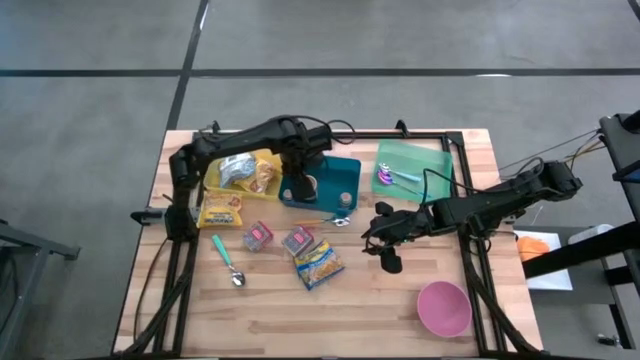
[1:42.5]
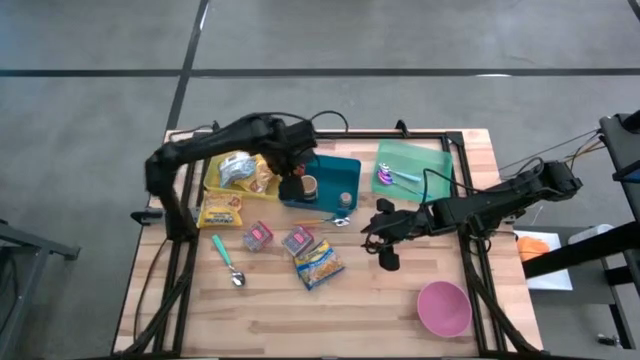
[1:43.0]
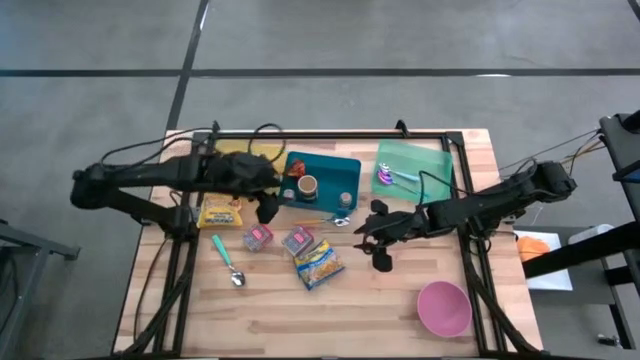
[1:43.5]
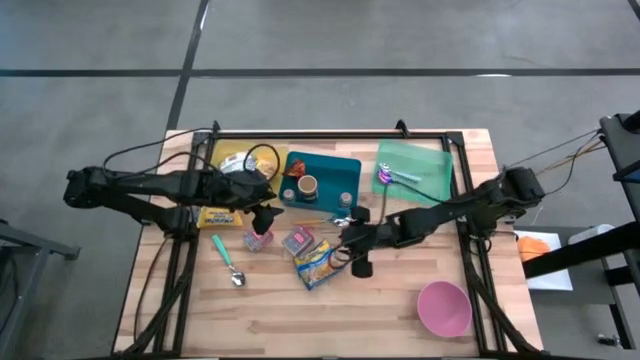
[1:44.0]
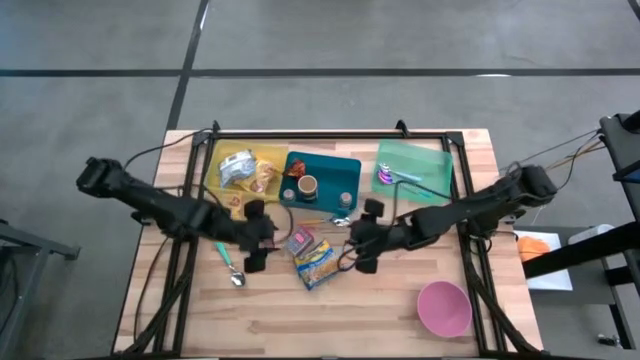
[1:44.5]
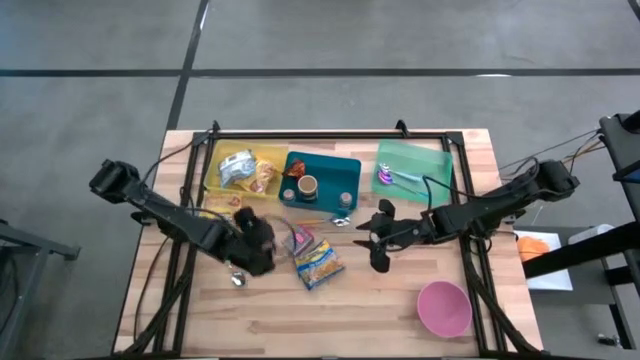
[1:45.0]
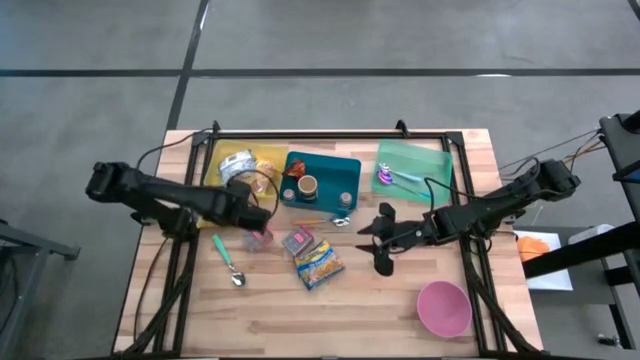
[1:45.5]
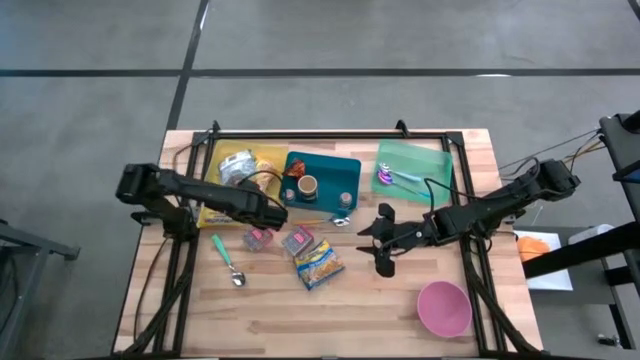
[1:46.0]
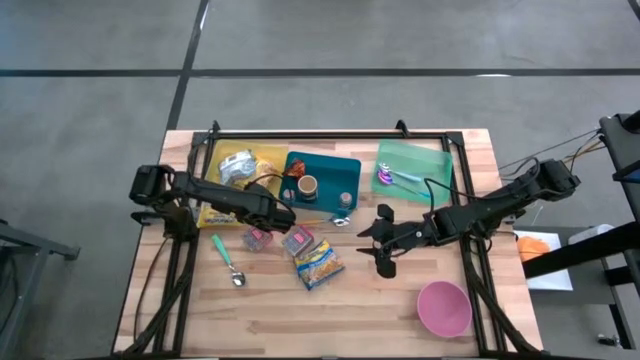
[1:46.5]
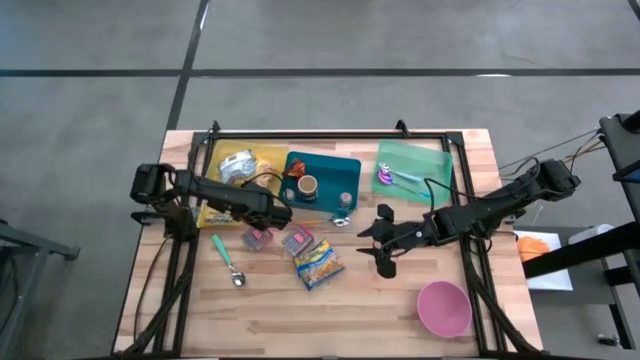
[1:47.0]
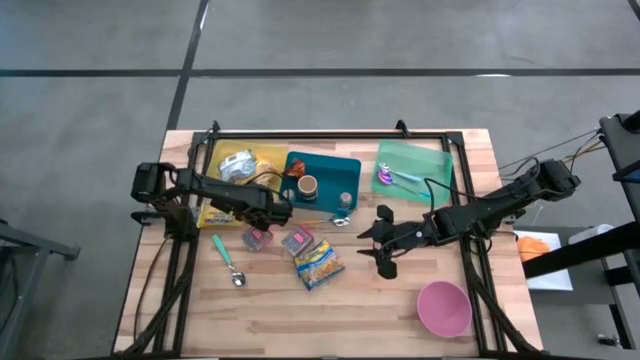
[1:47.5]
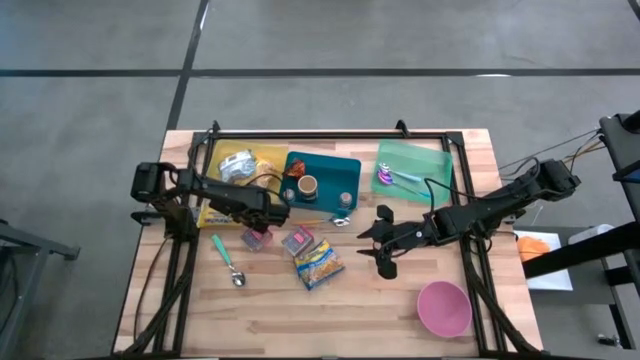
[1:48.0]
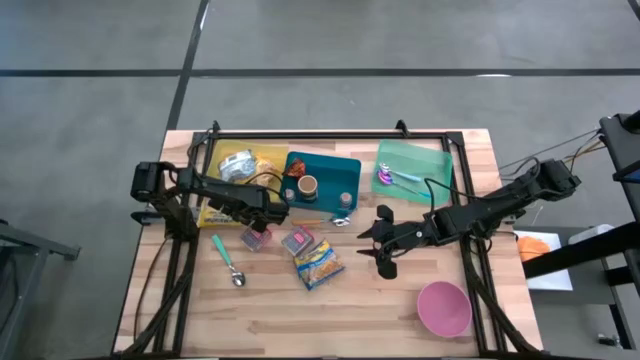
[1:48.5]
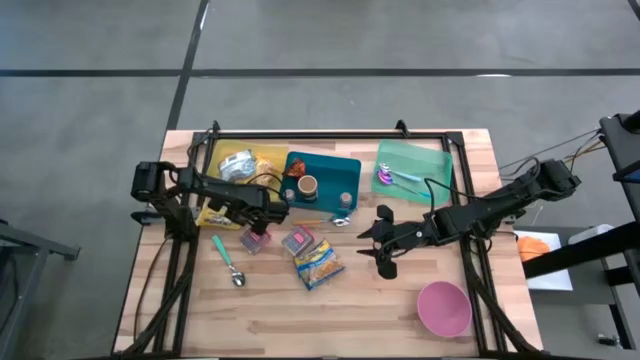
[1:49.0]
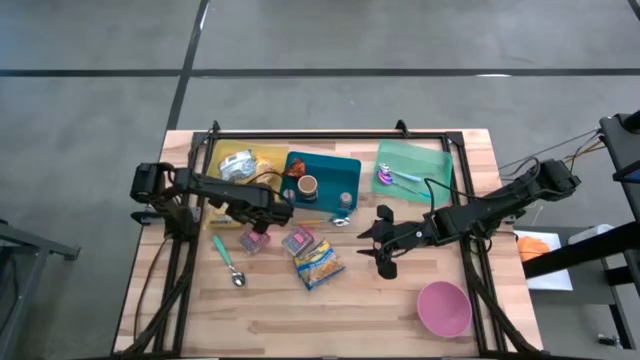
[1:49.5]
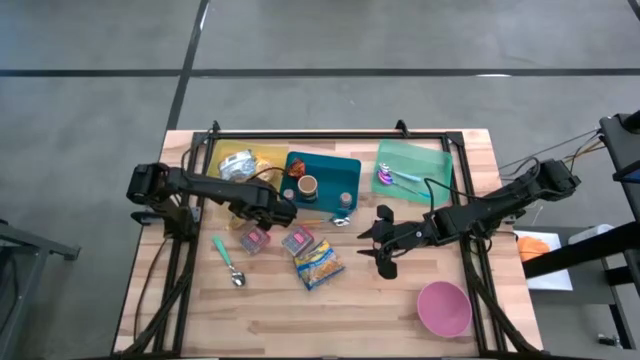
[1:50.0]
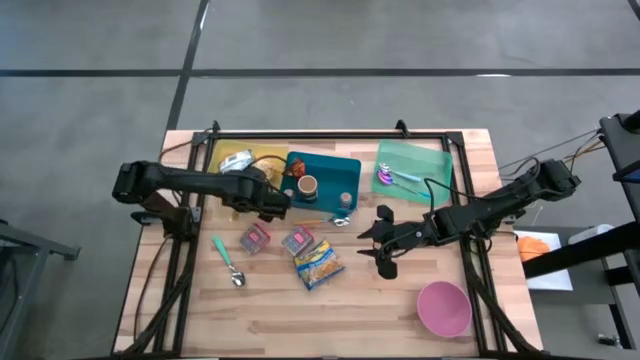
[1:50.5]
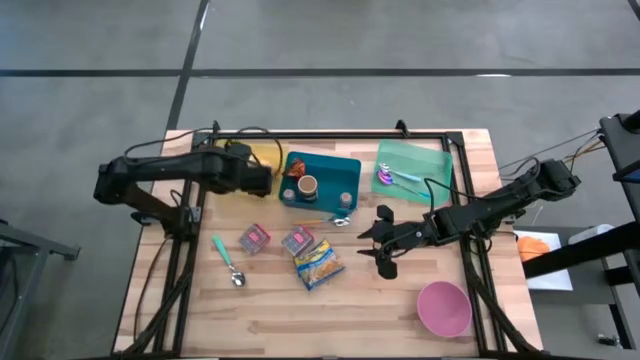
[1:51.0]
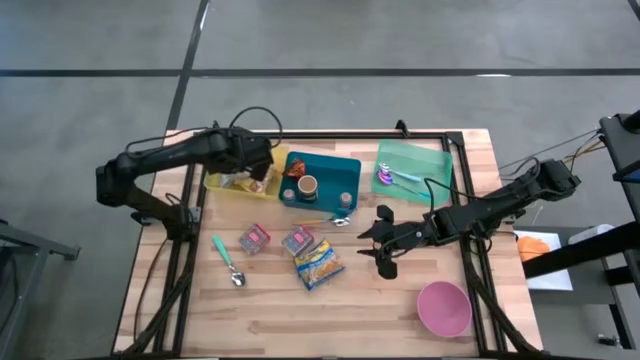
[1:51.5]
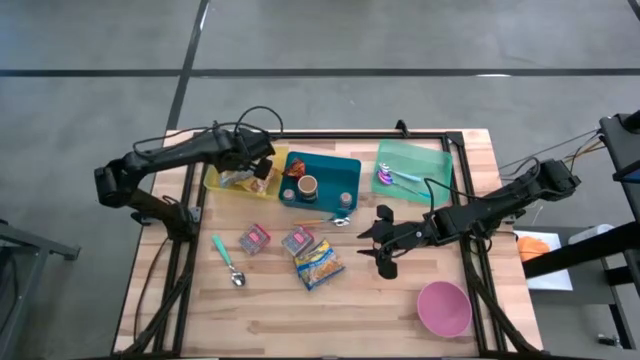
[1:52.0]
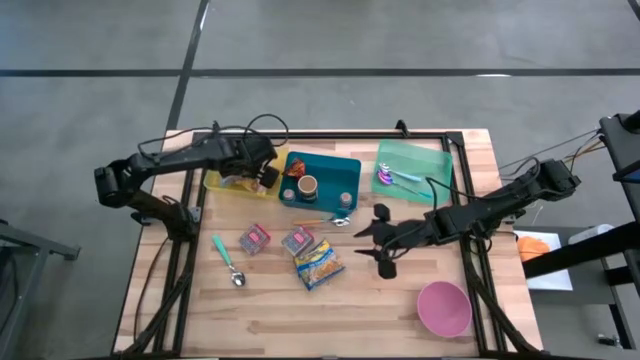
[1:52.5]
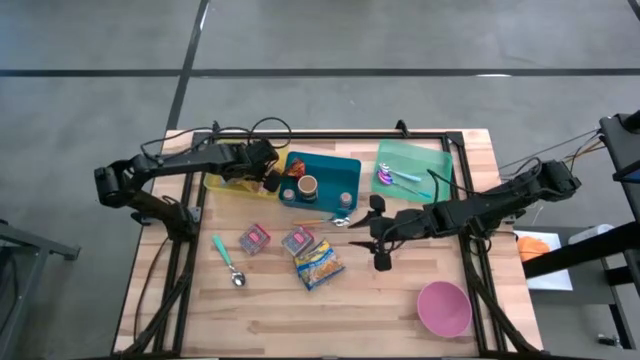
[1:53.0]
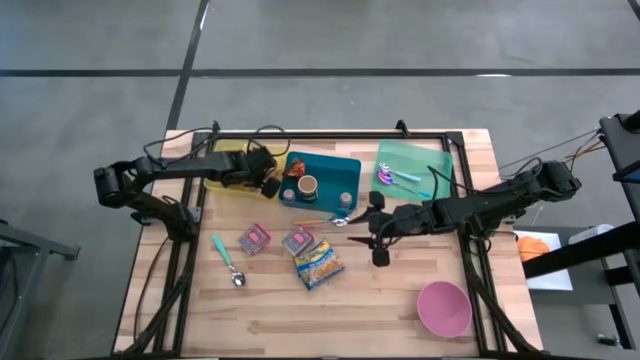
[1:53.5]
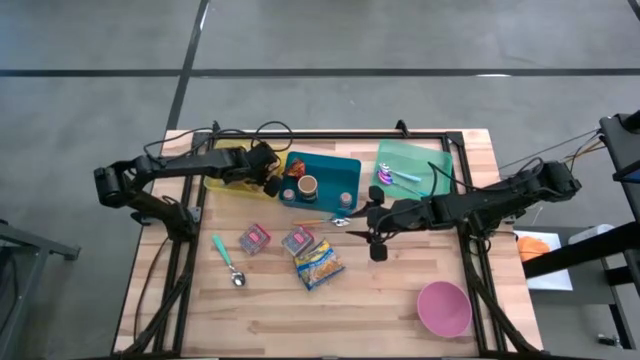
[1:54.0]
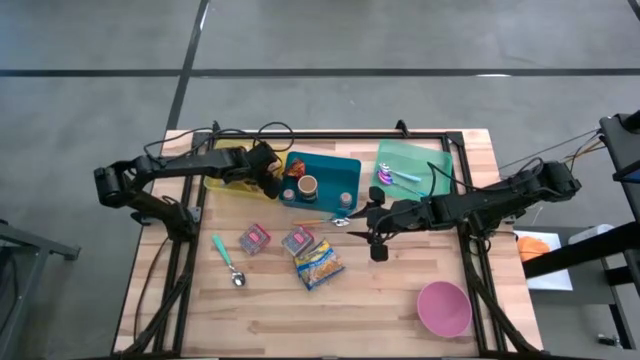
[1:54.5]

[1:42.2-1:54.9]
Put the yellow noodle pack into to the yellow bin

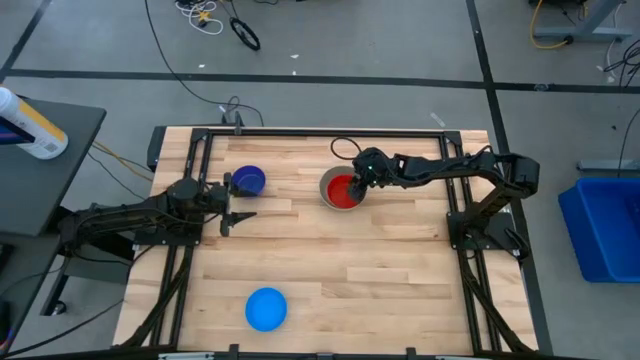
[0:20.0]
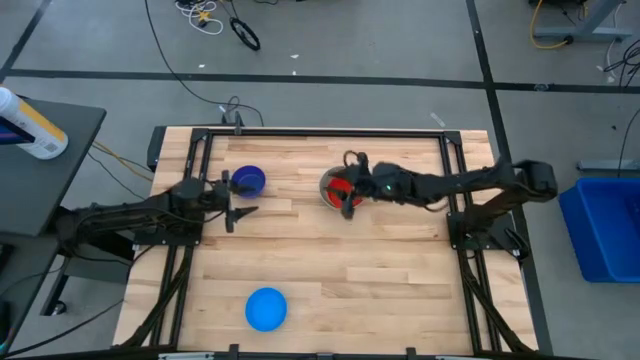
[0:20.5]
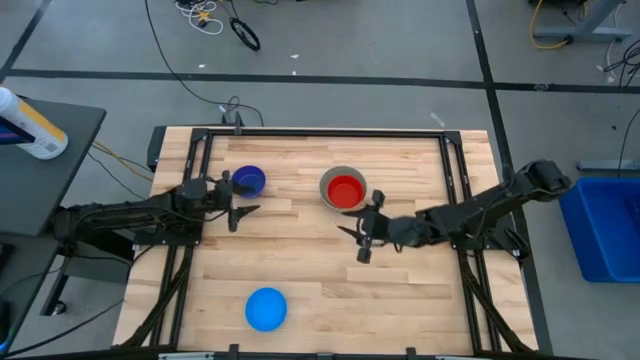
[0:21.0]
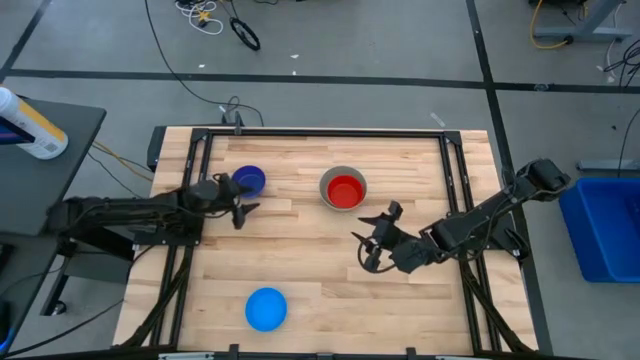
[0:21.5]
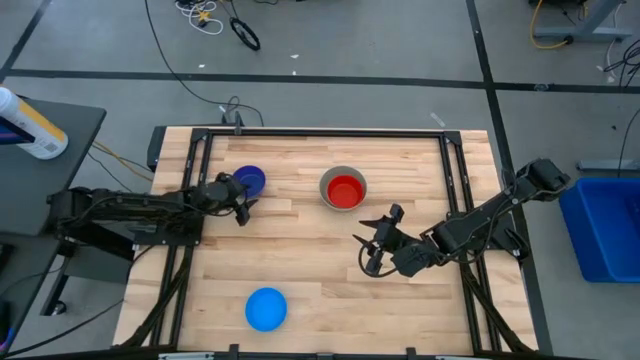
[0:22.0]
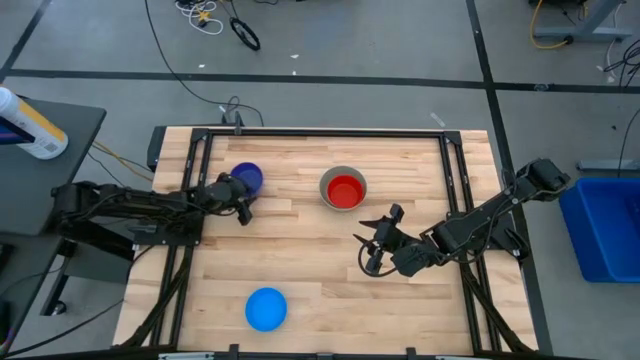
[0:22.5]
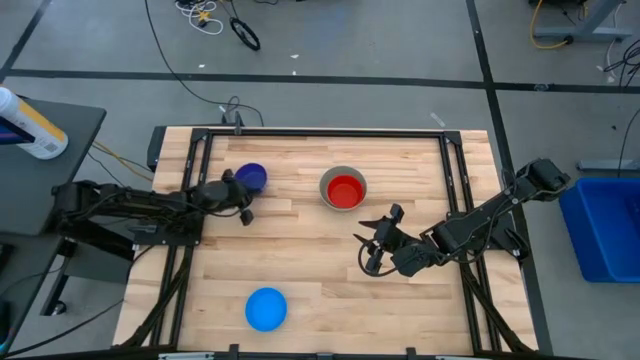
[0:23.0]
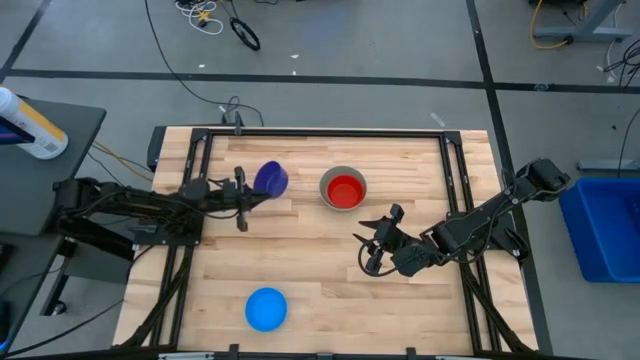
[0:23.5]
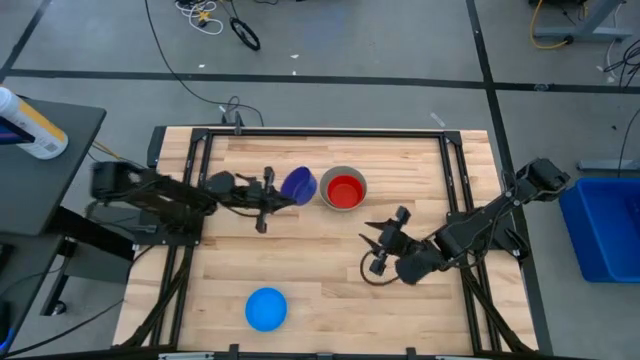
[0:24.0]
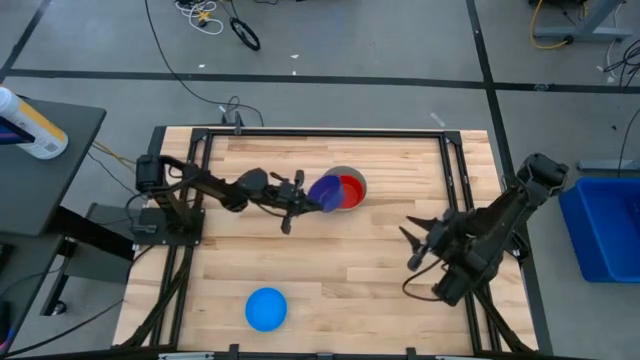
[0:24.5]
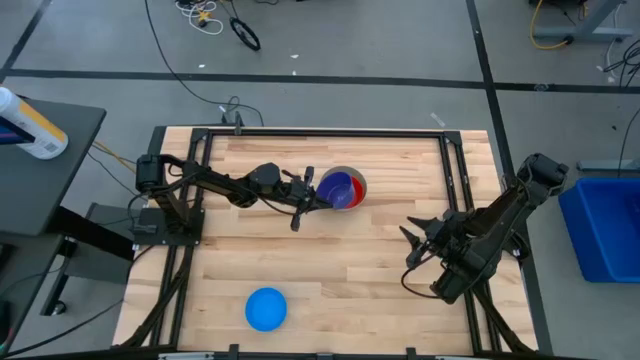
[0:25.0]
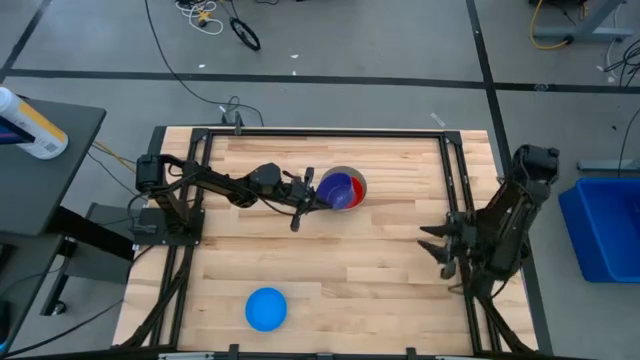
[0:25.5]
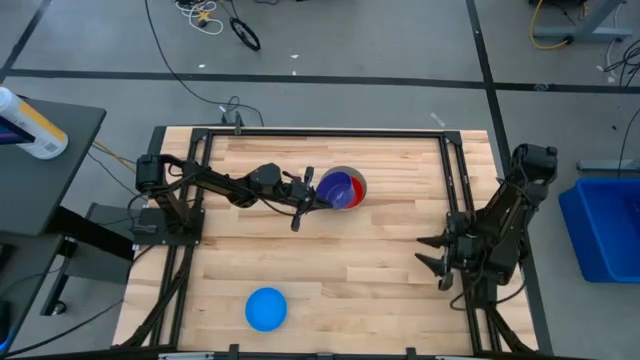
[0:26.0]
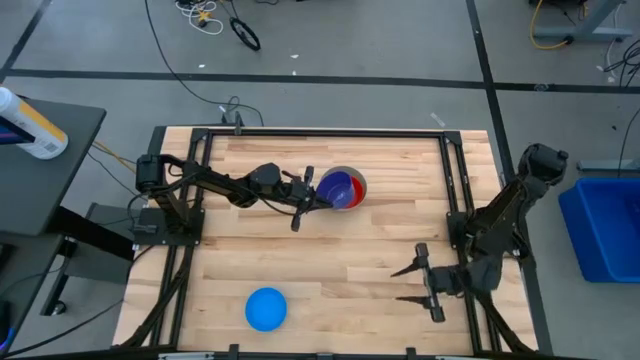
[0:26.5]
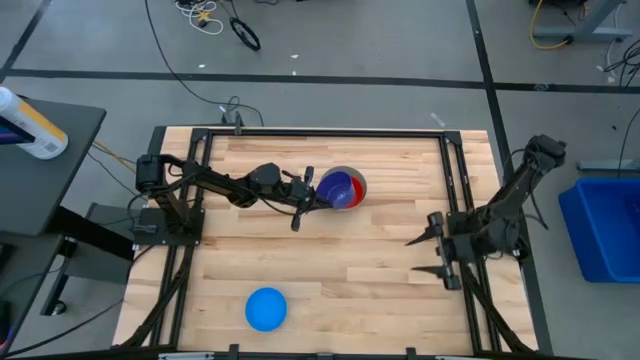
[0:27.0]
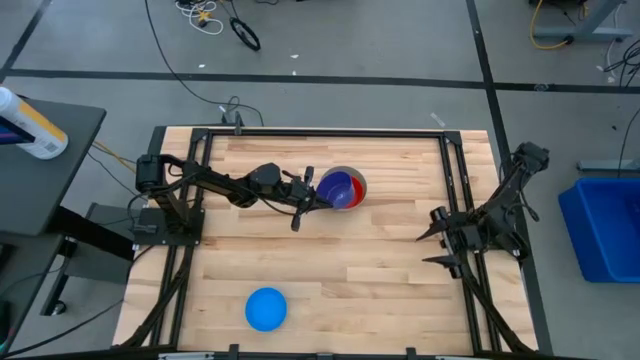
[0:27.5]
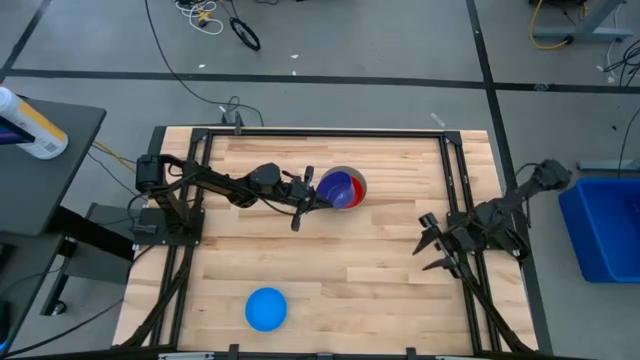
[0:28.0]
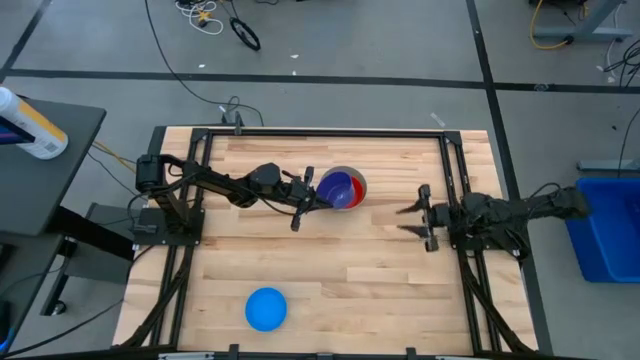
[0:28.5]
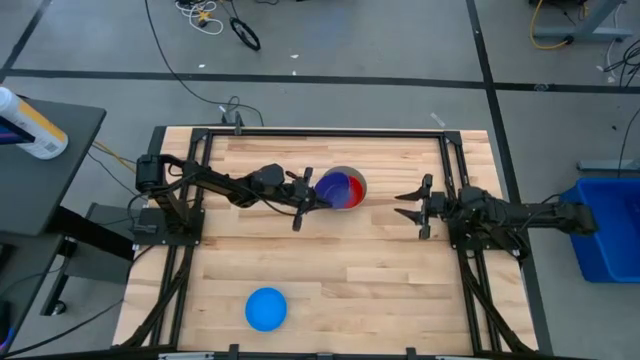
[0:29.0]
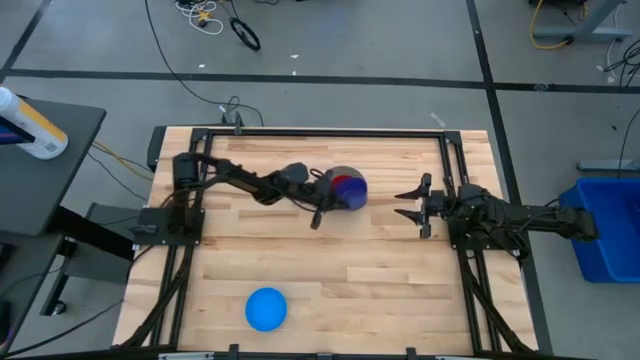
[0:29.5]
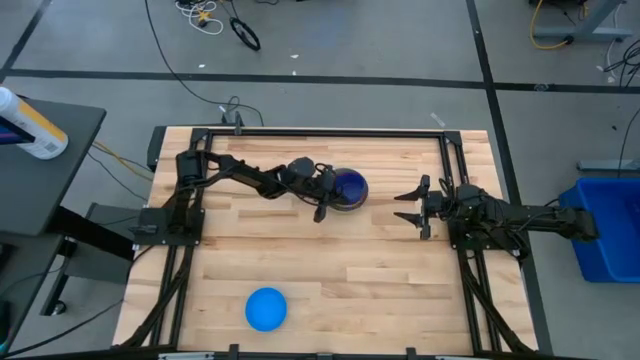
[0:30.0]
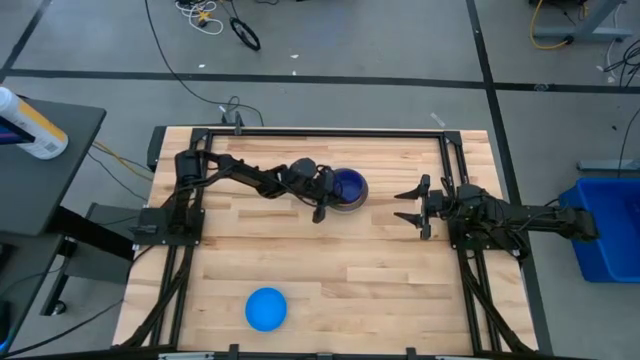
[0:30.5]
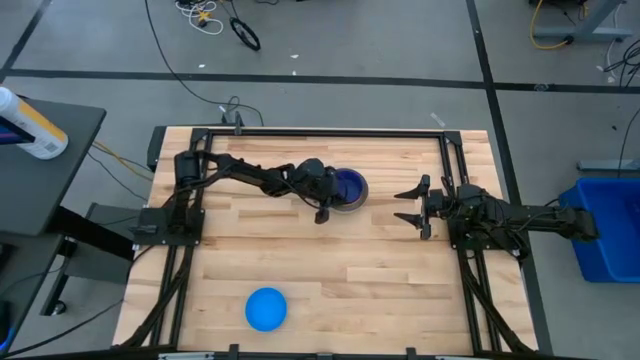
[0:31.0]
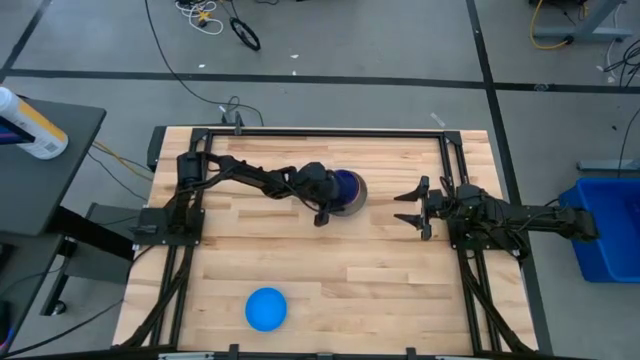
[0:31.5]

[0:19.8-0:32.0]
Stack the dark blue bowl on top of the red bowl
